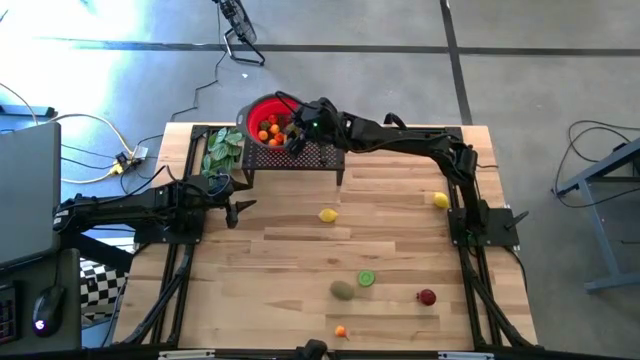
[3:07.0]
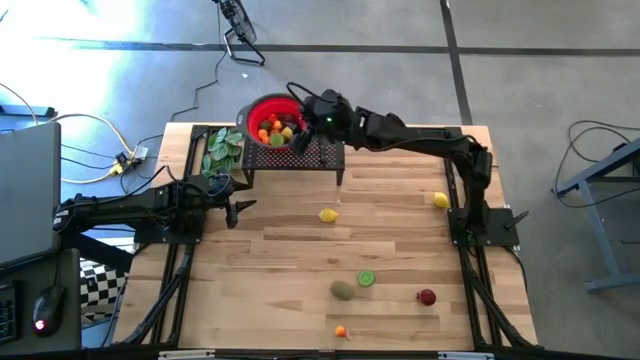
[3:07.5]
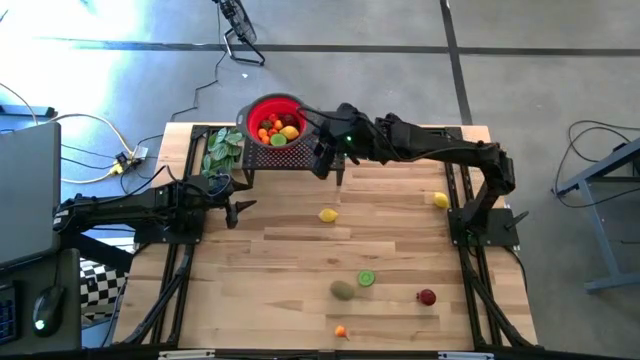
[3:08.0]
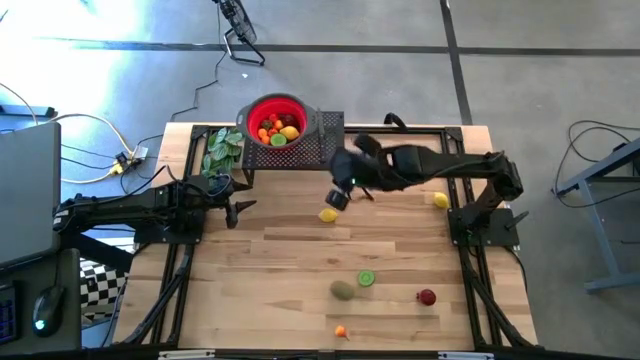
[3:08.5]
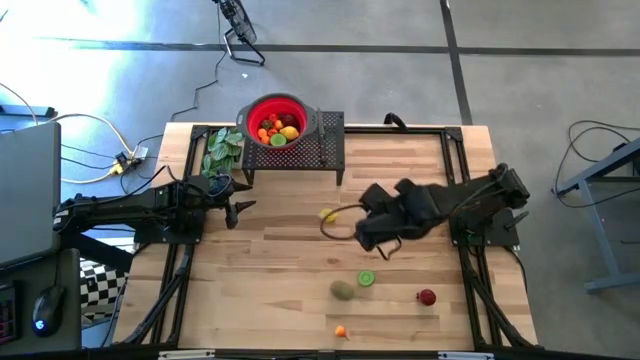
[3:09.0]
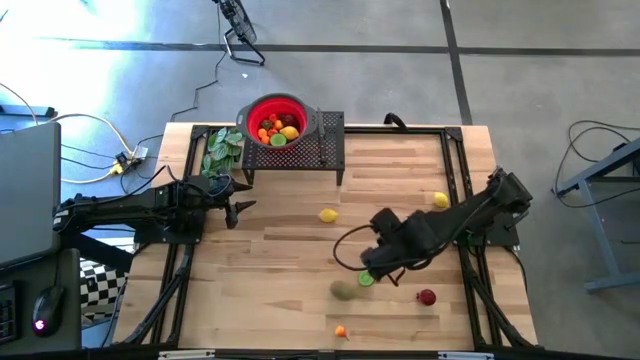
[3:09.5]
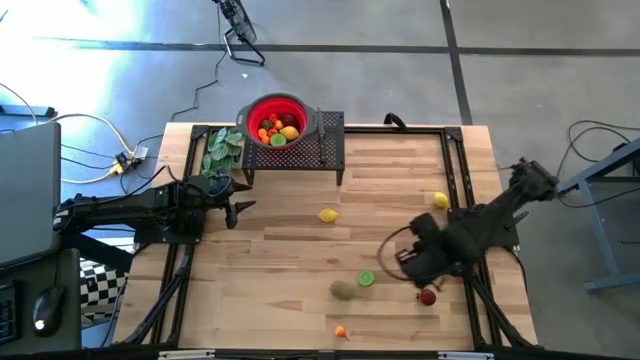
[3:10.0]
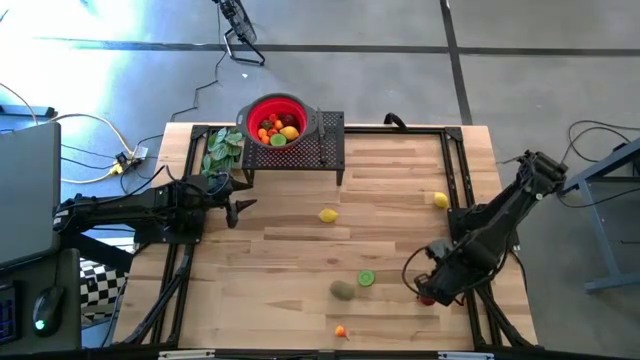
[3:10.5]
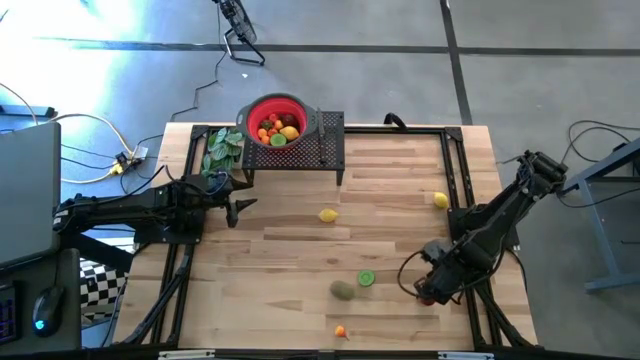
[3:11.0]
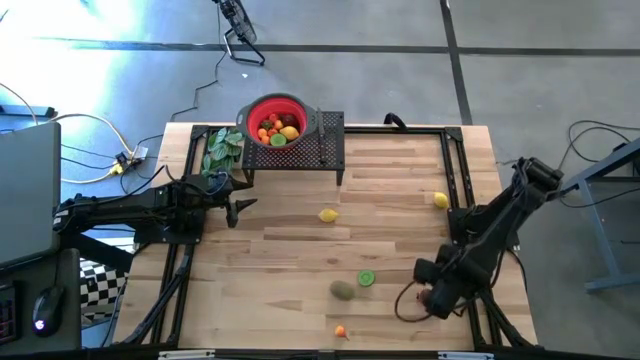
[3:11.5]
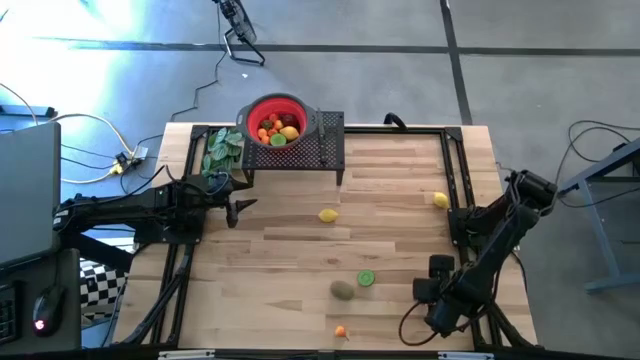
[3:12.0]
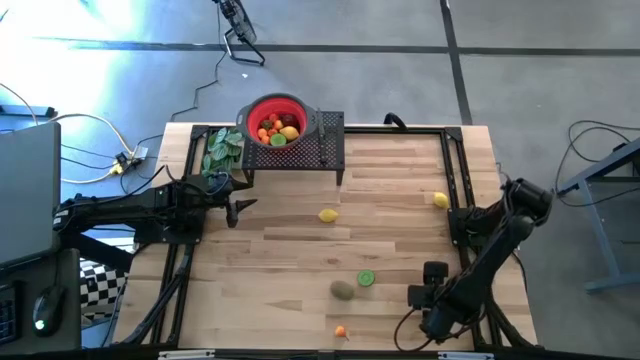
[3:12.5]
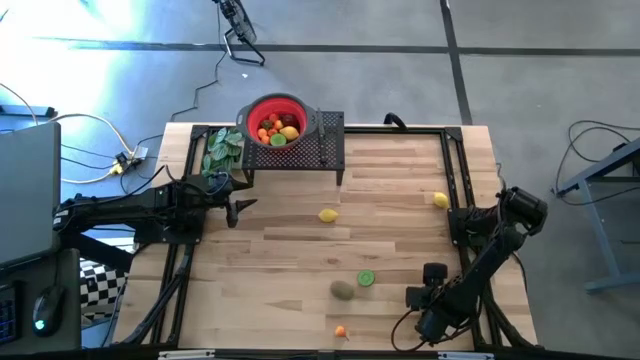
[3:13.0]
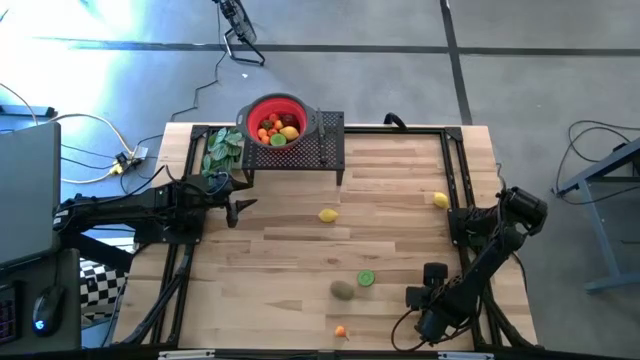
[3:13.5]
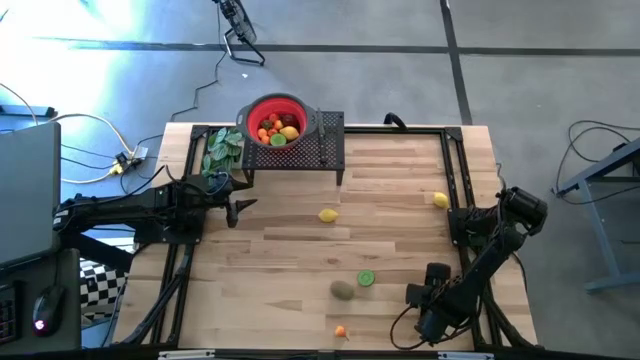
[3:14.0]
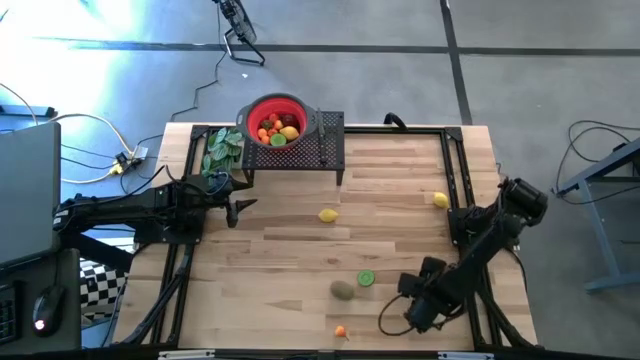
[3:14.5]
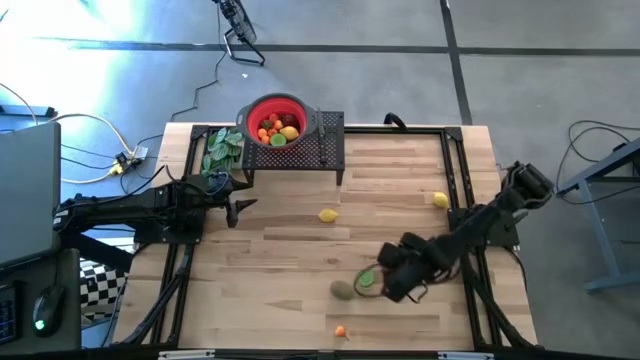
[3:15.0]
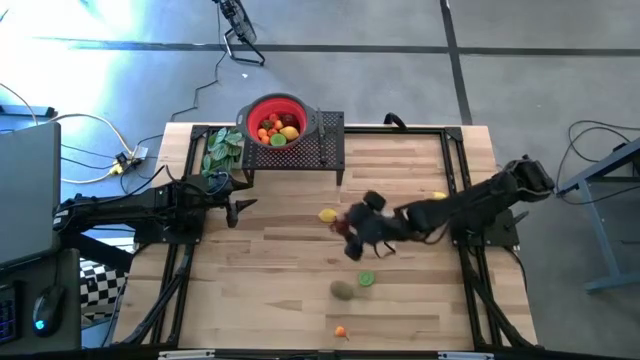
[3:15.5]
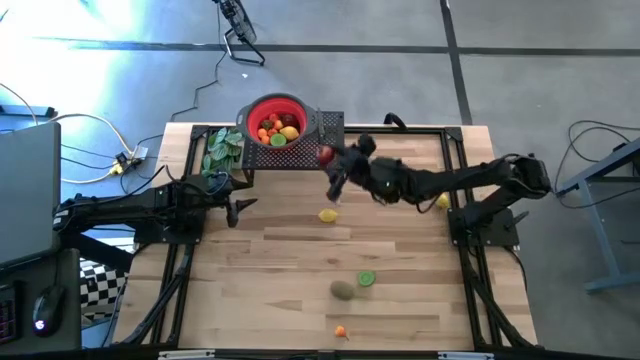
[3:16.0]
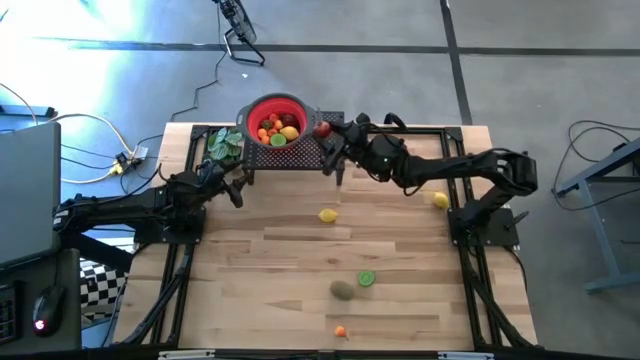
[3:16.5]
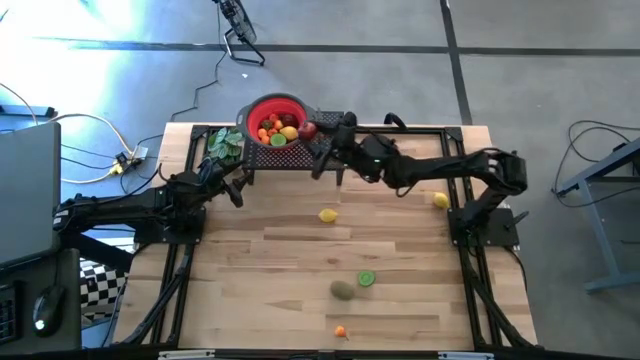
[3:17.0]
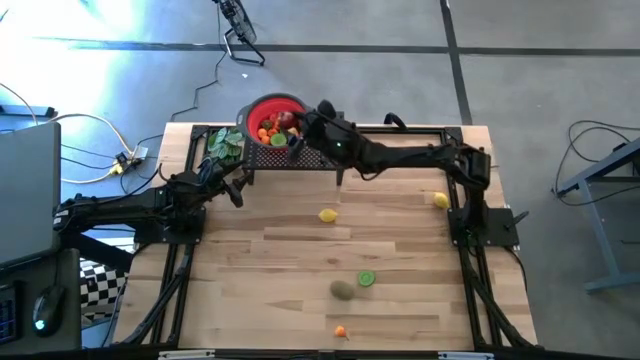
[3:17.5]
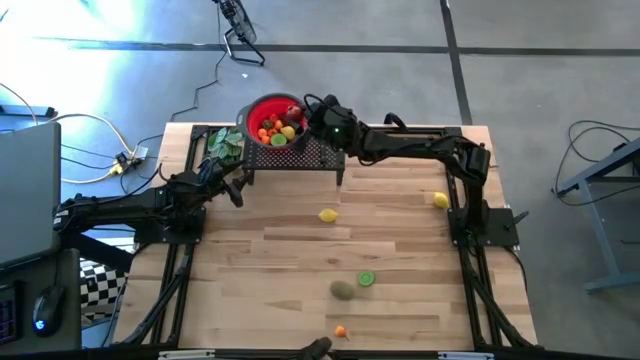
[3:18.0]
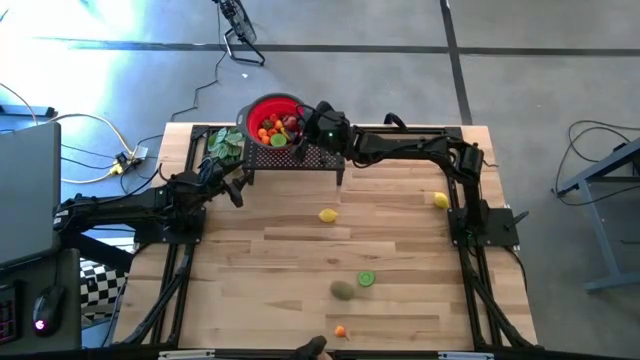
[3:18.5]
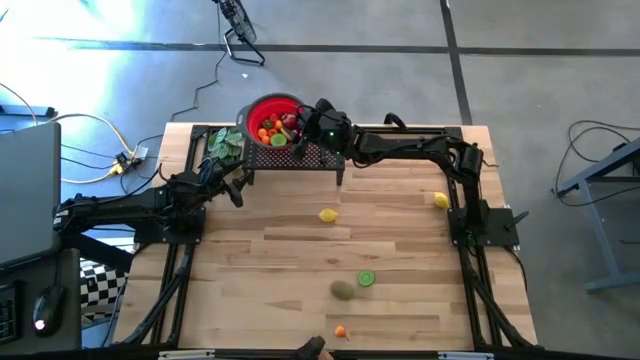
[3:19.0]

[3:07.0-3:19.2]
Task: Pick & Place Fruit
Put the red pomegranate into the red strainer bowl on the shelf

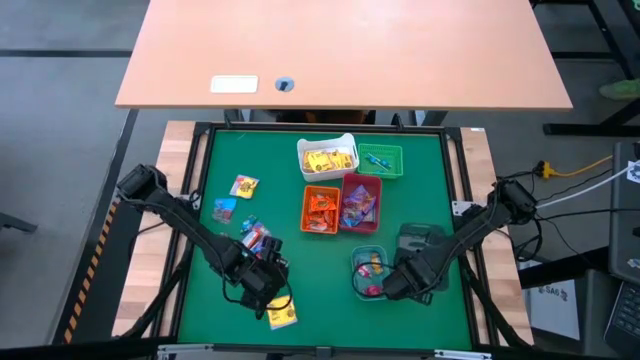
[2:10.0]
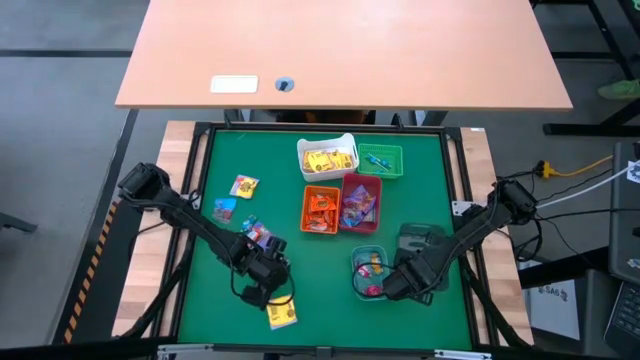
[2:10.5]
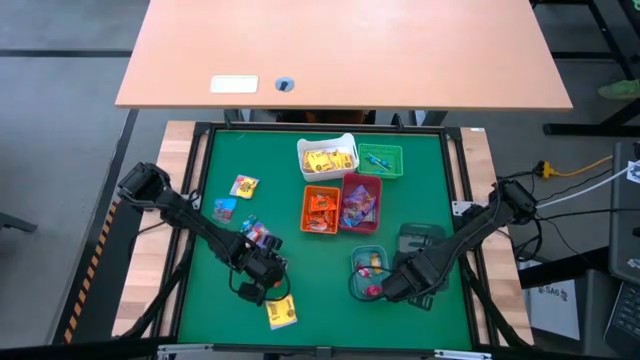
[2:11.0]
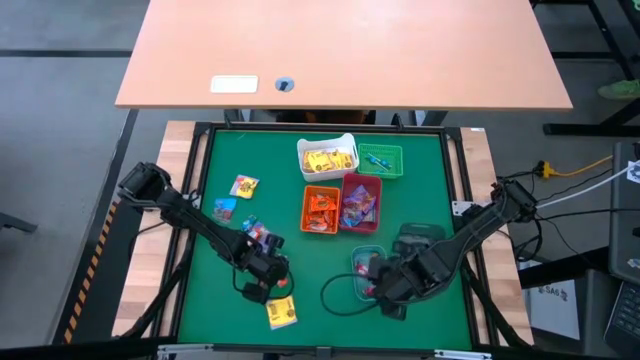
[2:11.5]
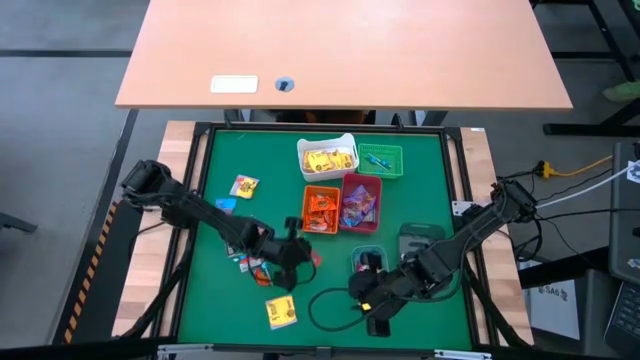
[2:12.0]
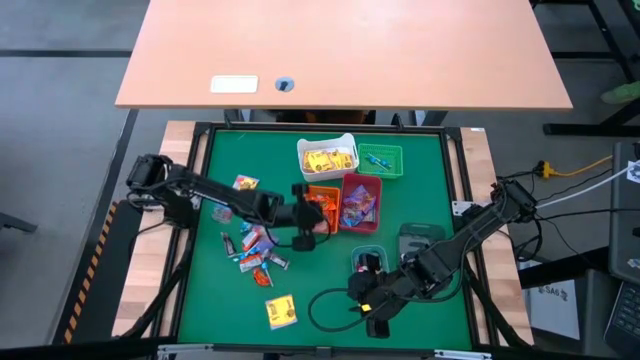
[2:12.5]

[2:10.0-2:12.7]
Task: Sort candy
Put the orange chocolate into the white bin

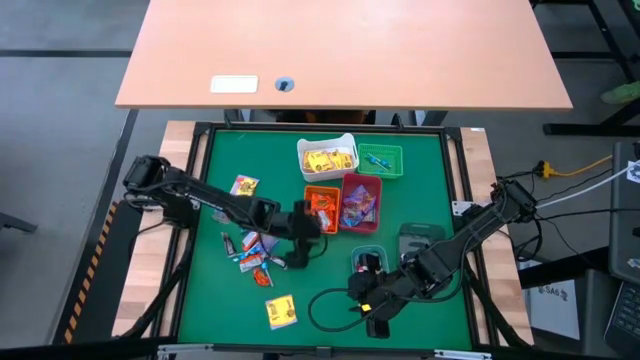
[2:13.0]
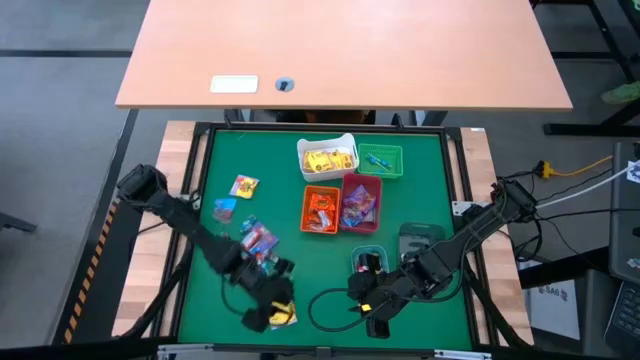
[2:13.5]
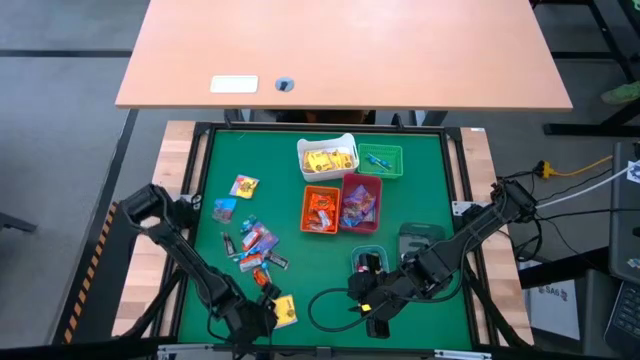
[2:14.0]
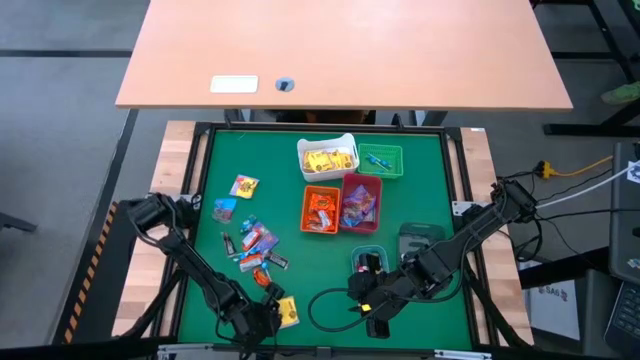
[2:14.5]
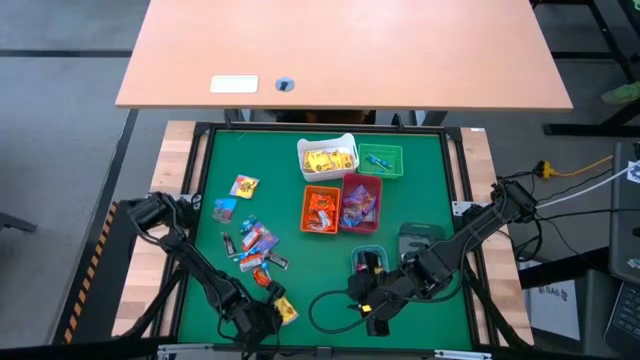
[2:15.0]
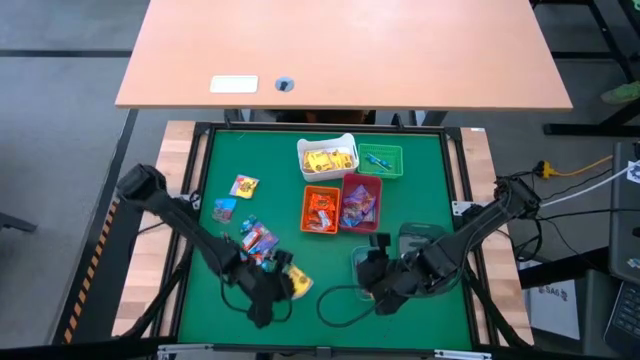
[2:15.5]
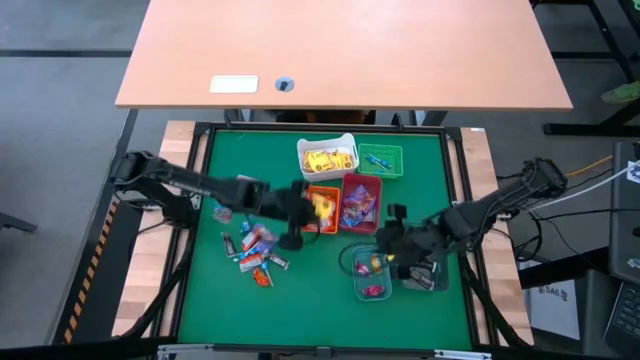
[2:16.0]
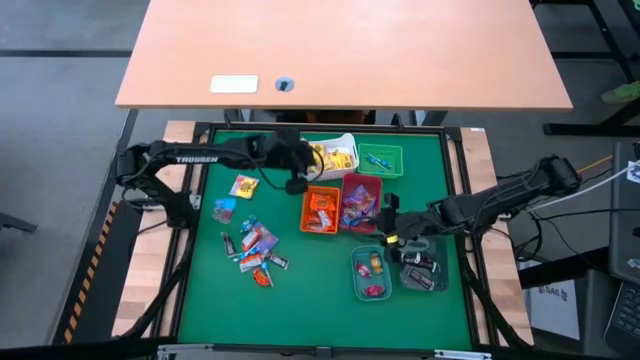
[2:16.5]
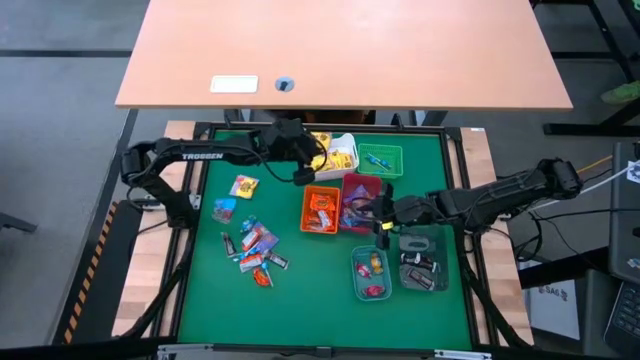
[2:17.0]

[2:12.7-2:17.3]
Put the yellow bag of candy into the white bin

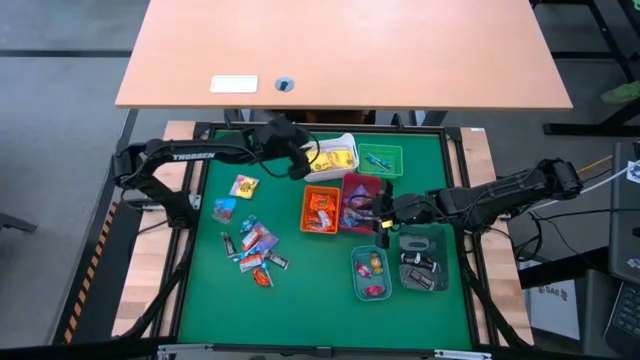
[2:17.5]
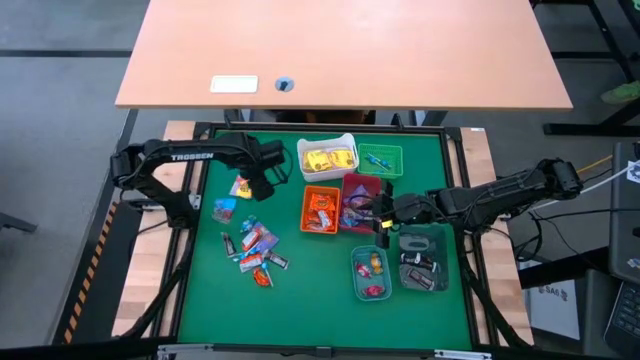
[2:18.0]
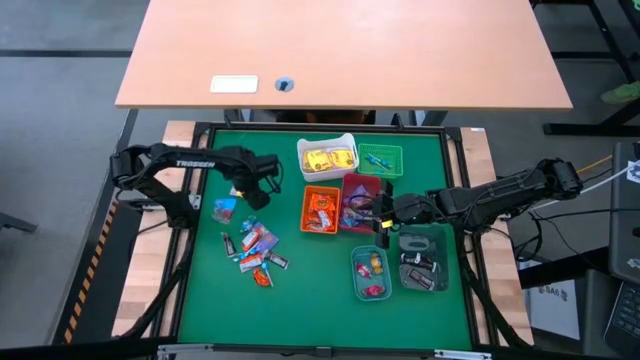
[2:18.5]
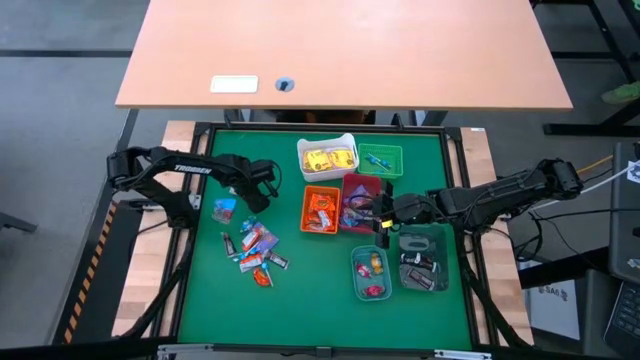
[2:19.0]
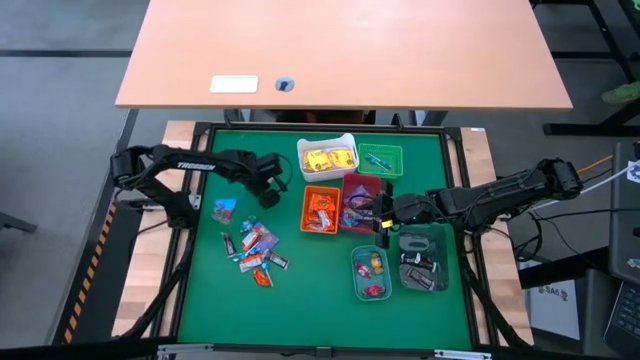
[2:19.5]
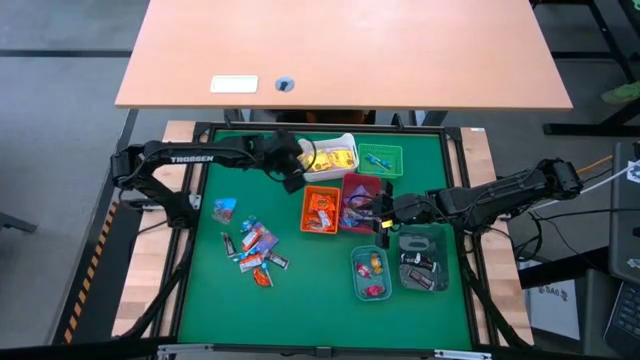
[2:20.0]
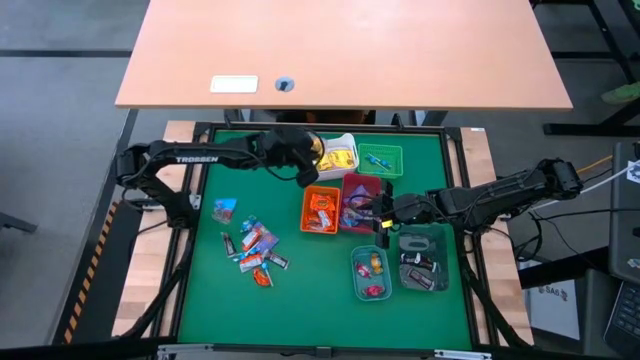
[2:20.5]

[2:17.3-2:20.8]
Put the yellow bag of candy into the white bin
